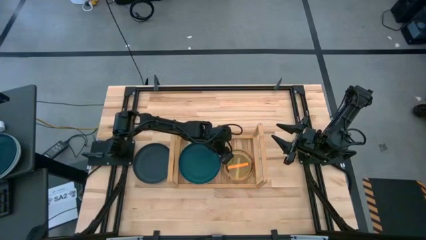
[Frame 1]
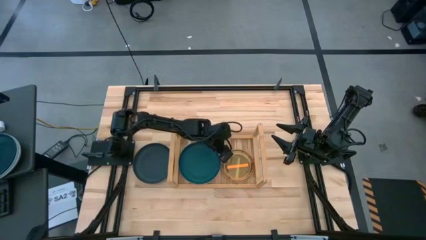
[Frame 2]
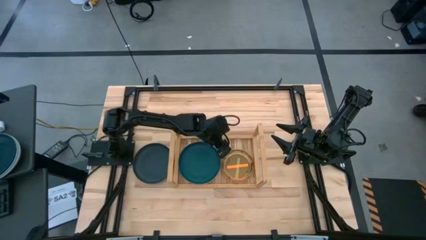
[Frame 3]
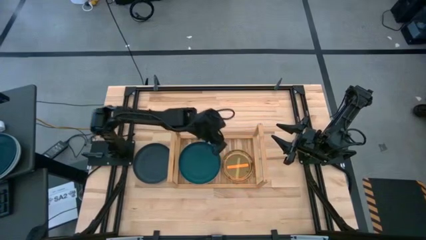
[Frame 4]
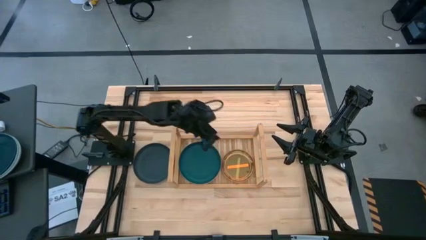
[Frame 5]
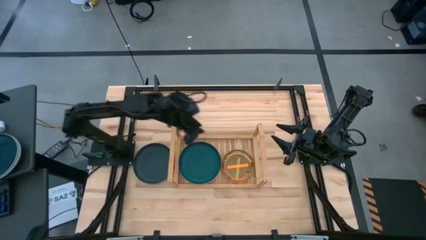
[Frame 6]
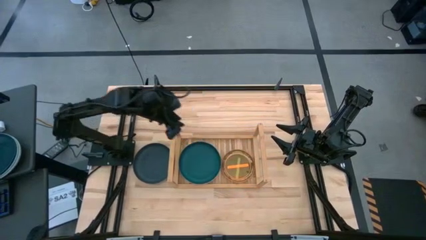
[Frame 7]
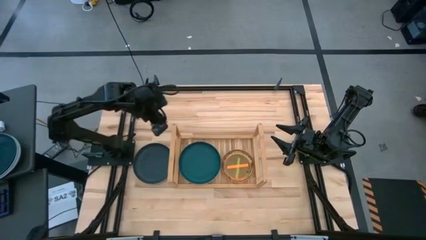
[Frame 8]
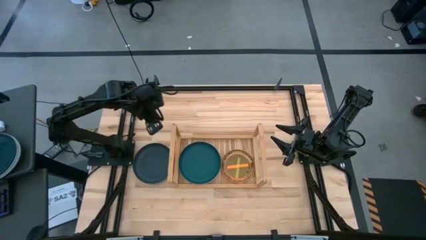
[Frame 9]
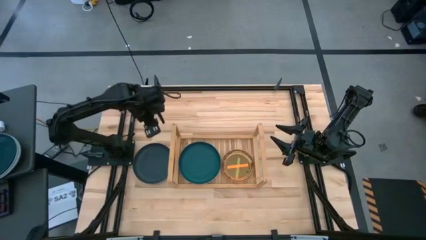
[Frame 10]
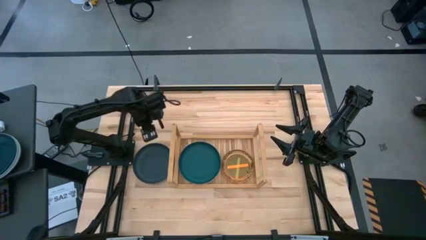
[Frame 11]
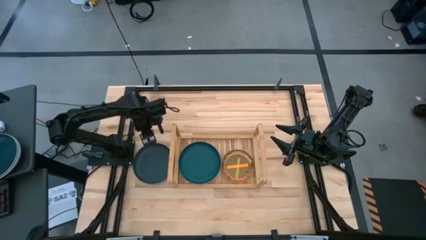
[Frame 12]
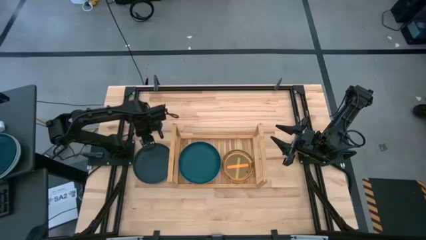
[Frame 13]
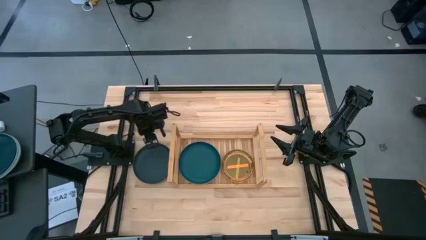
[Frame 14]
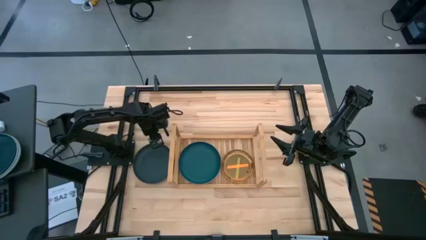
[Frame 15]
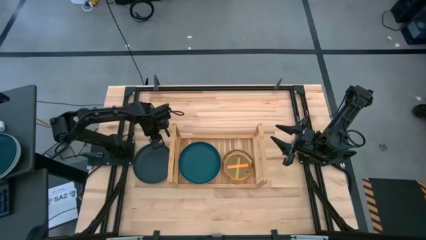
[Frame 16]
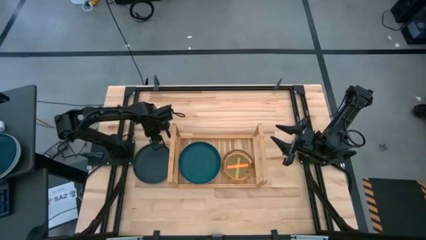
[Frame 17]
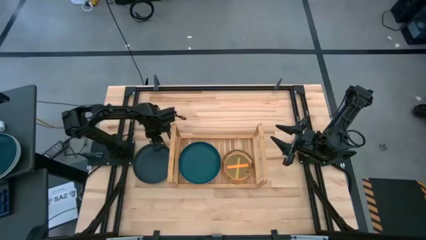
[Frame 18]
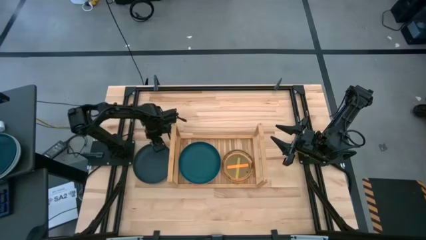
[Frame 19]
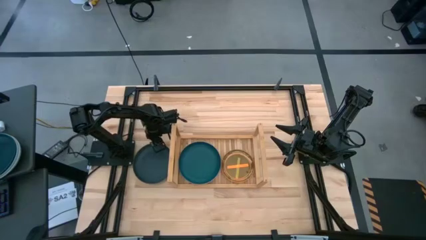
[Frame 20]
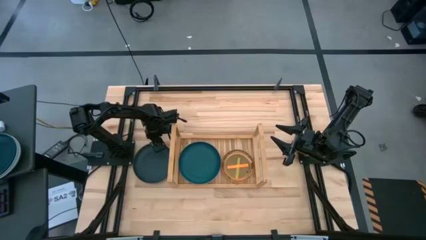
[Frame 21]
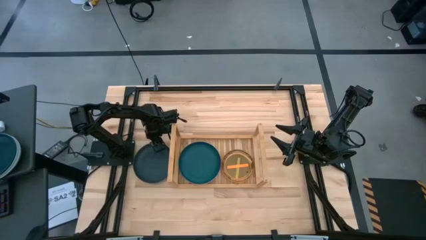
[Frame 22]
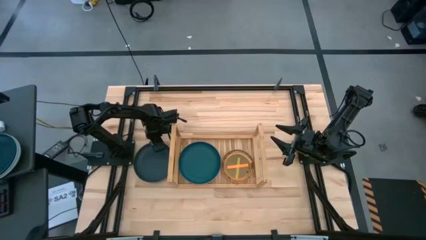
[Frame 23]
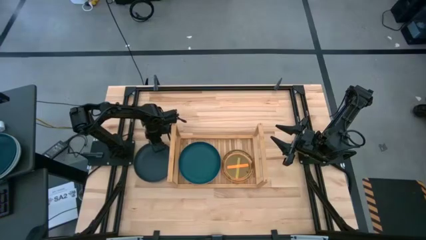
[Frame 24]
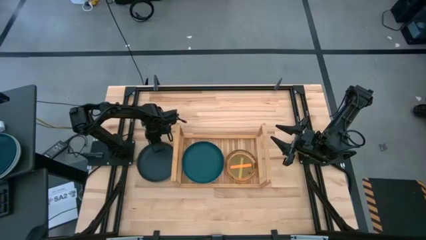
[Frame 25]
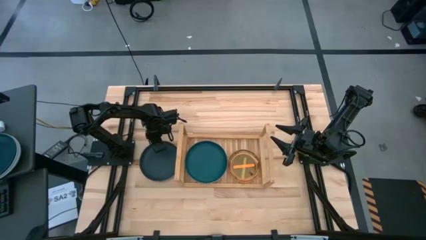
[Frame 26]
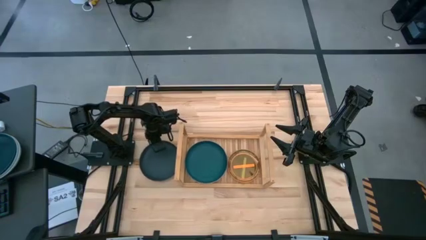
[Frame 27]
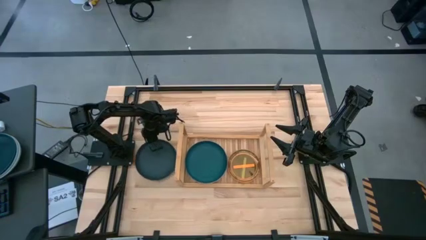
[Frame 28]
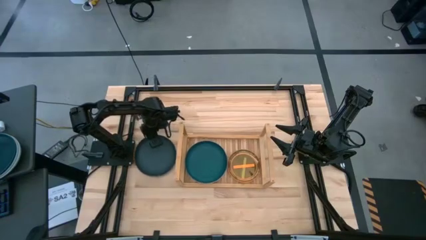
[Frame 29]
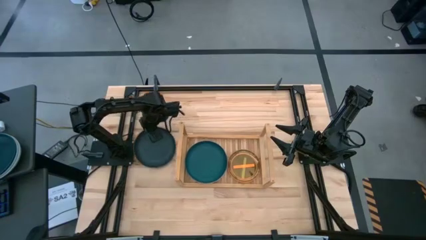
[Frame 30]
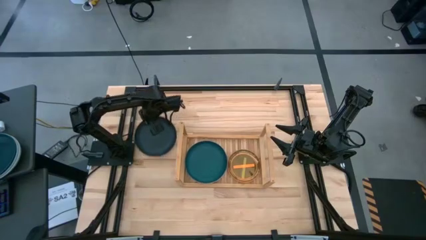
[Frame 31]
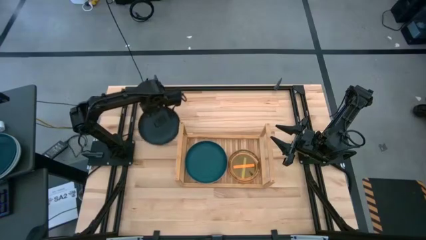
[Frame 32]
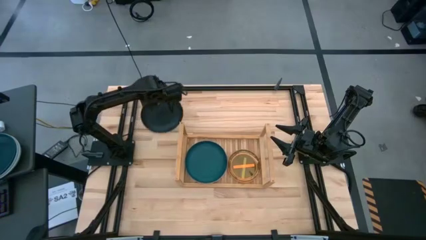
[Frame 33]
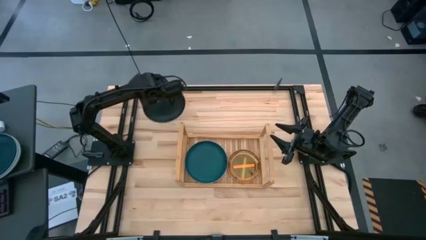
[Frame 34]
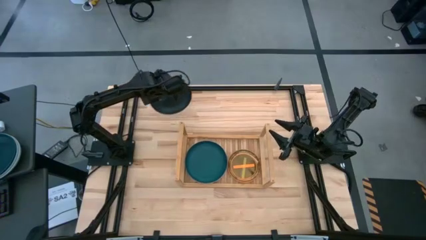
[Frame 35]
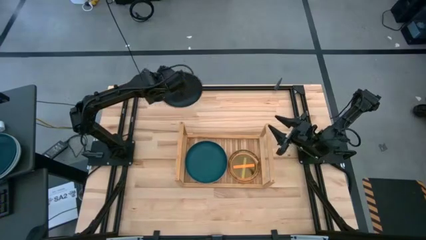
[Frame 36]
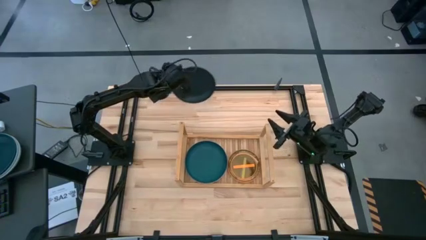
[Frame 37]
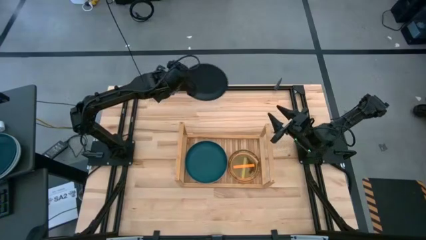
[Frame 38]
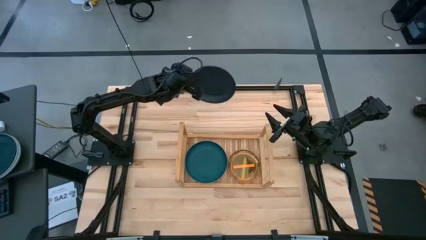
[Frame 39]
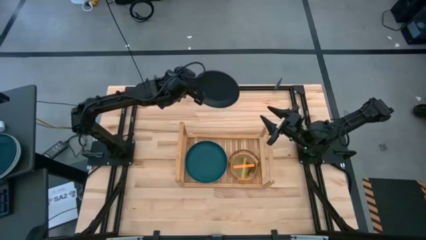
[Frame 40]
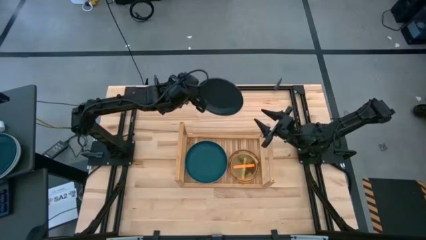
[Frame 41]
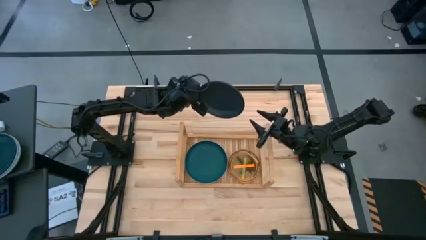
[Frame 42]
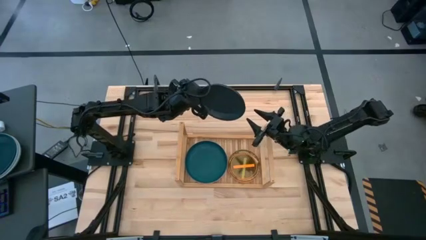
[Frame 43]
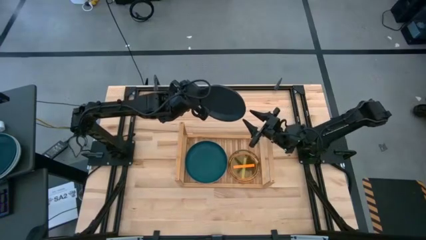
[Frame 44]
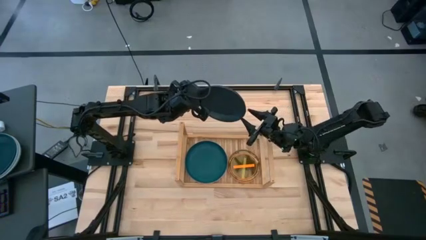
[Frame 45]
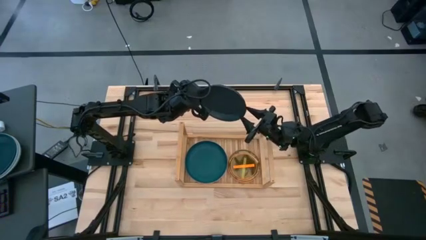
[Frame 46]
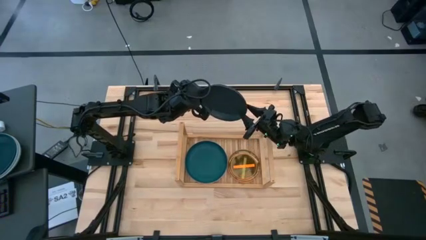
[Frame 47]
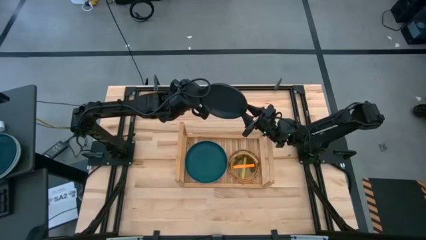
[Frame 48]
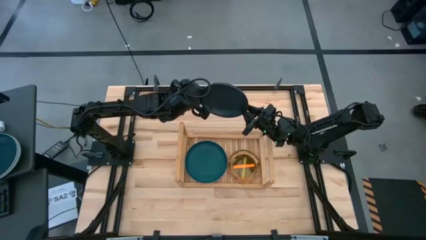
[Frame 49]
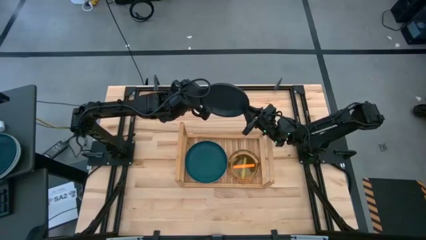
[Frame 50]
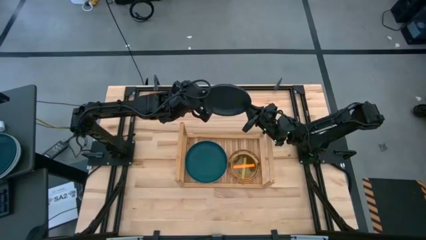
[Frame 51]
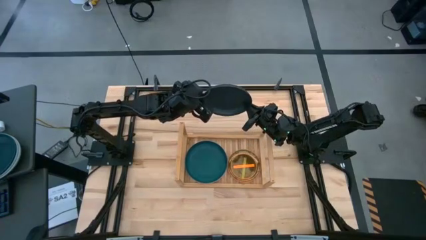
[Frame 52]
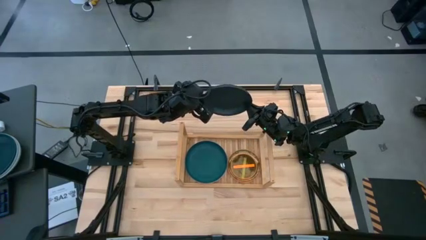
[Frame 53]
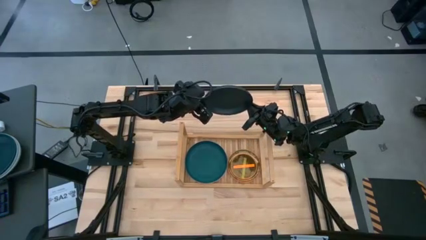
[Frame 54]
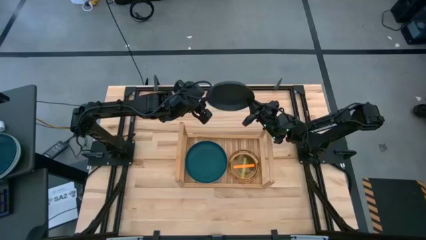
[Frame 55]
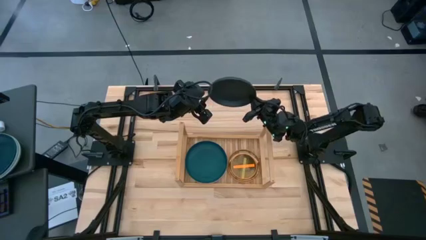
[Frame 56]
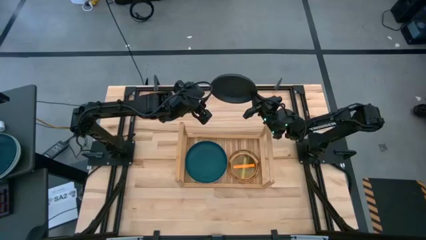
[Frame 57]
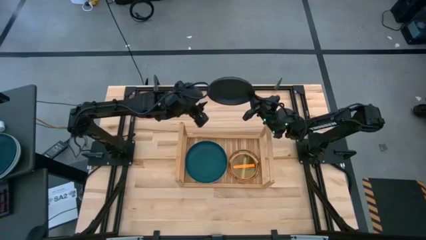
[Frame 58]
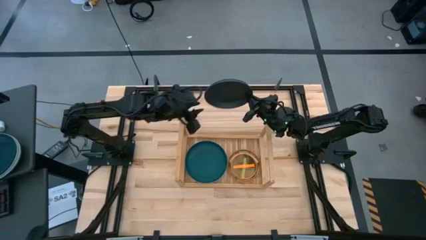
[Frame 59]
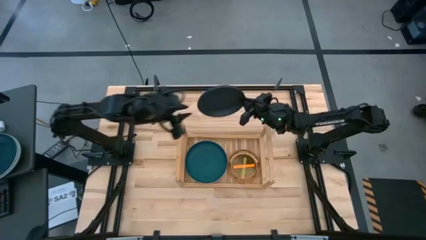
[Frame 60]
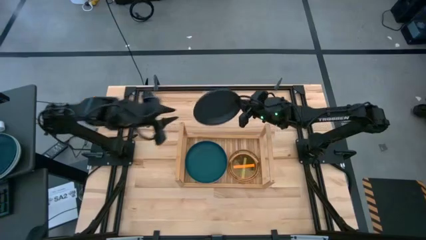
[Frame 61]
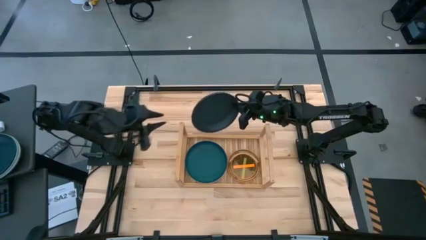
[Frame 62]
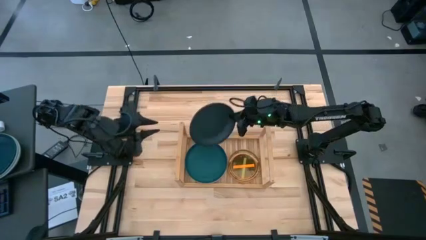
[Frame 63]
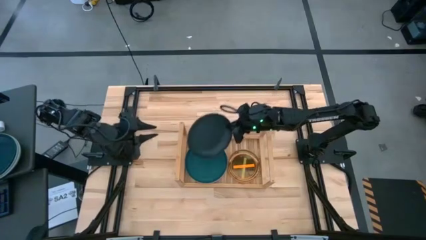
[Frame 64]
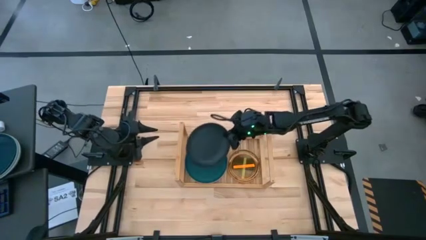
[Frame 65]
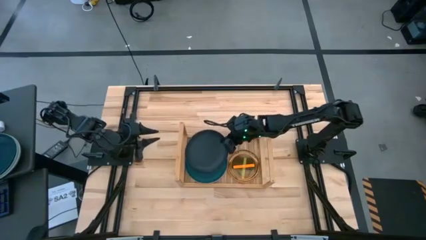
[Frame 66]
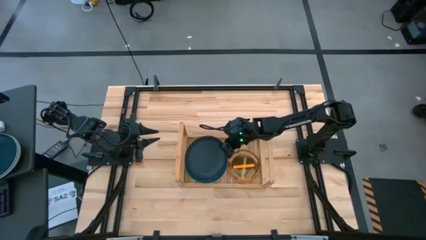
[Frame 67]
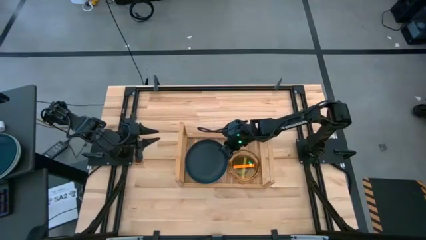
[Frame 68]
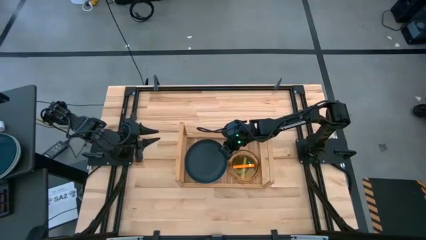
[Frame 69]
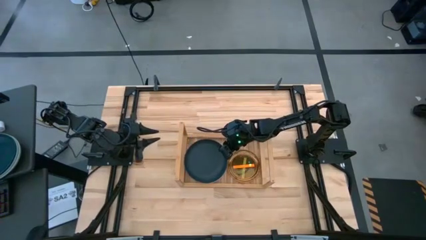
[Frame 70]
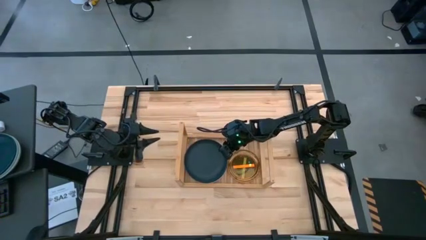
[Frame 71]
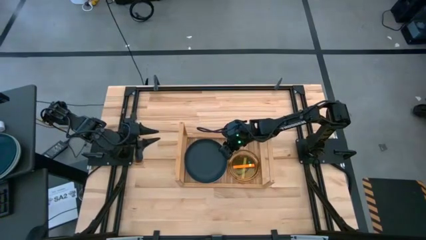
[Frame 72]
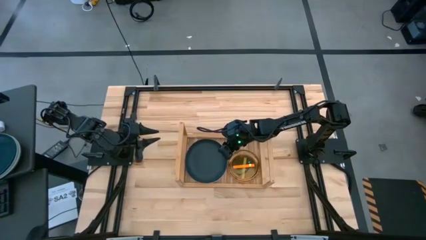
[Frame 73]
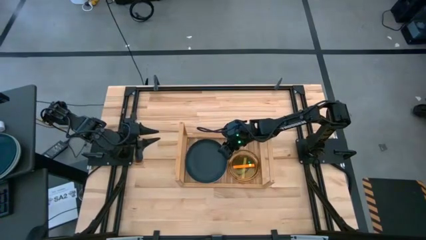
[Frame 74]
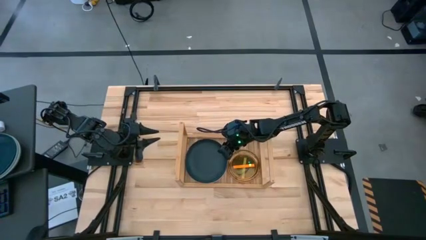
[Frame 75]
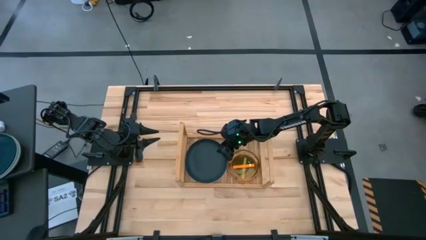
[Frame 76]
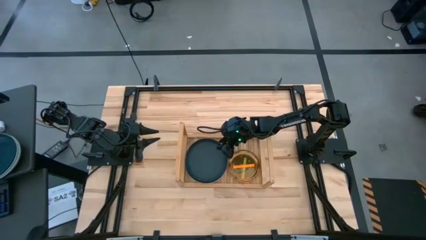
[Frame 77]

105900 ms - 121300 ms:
Task: Place and stack plates onto a shelf
Stack the black plate on top of the dark green plate on the shelf

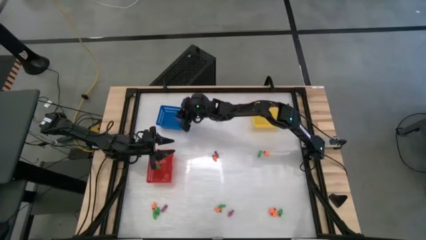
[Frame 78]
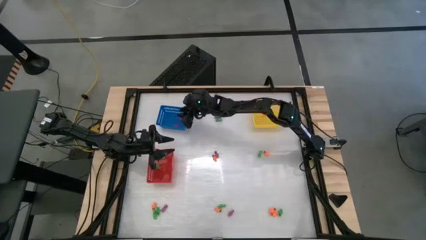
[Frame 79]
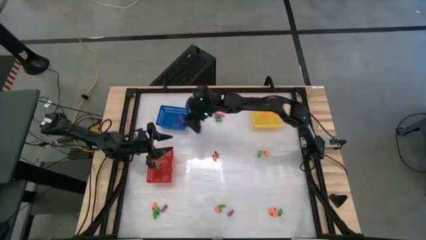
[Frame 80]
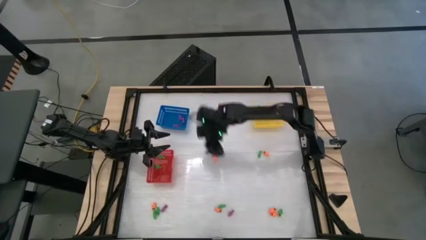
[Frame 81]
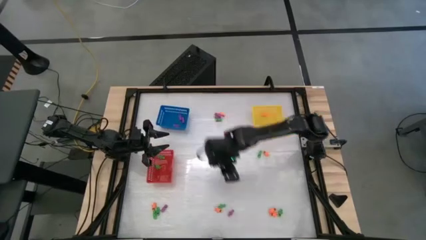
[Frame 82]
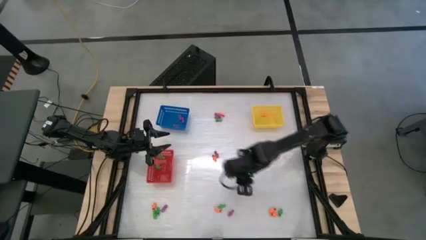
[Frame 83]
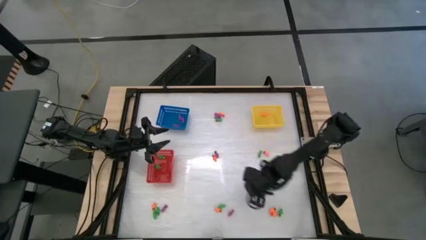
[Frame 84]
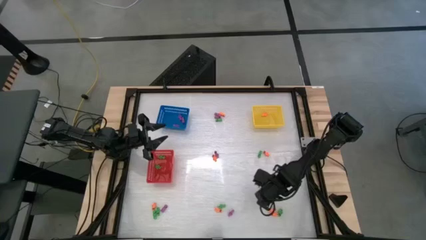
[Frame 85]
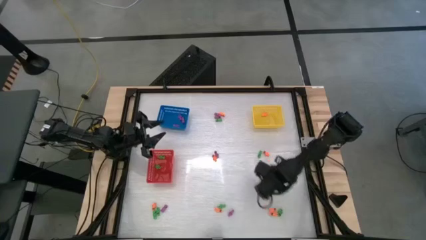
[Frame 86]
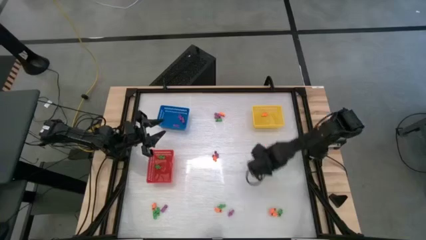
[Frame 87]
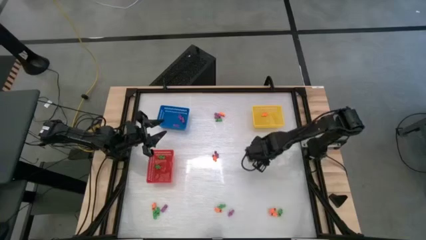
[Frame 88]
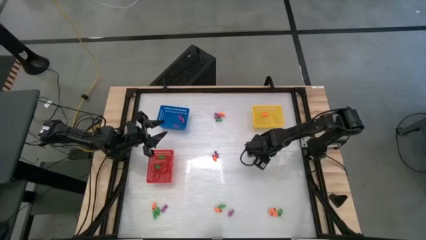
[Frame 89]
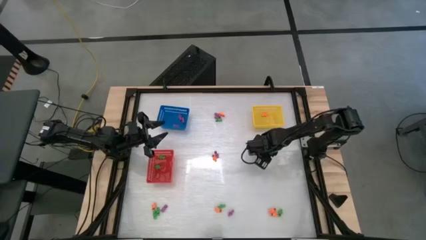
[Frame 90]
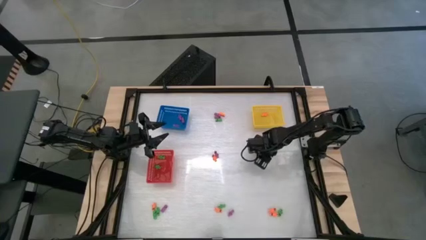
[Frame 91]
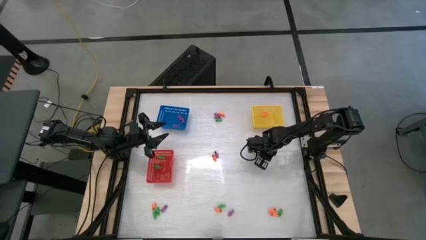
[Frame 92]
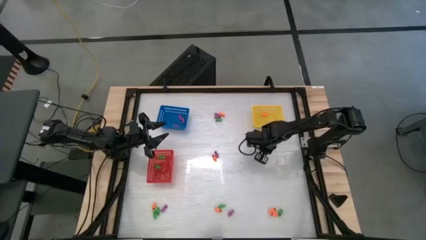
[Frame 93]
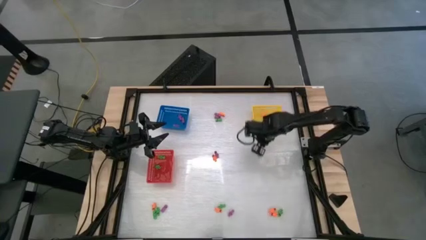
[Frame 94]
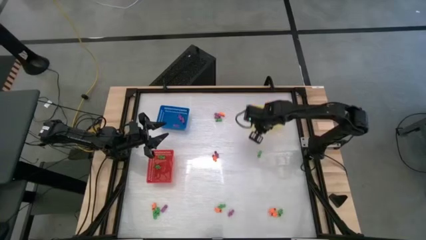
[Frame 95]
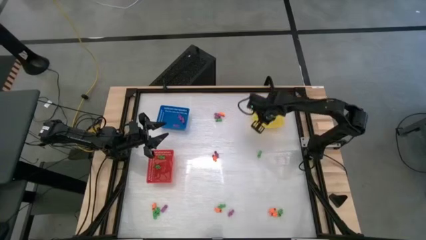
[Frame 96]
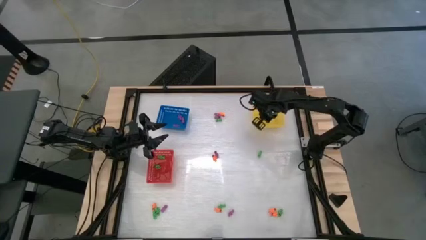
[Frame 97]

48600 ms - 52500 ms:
Task: Sort Halloween decoration
Put the orange skeleton toy into the yellow bin
